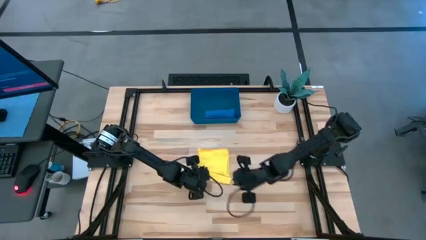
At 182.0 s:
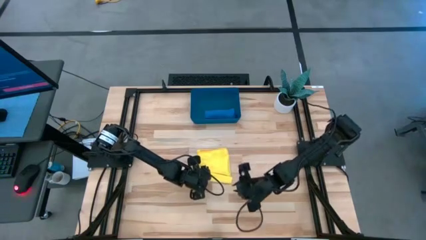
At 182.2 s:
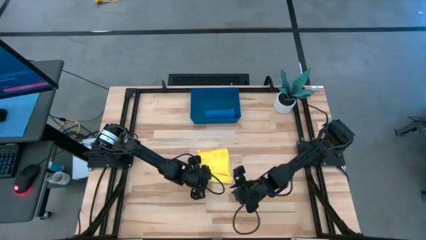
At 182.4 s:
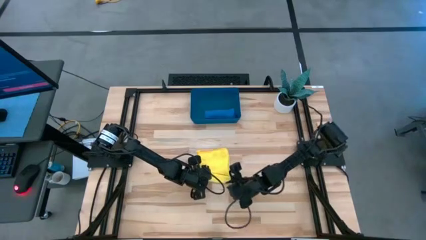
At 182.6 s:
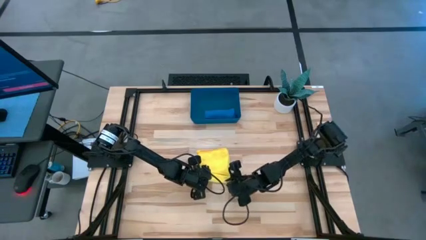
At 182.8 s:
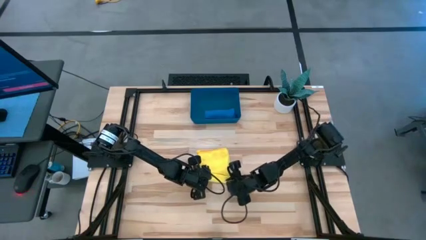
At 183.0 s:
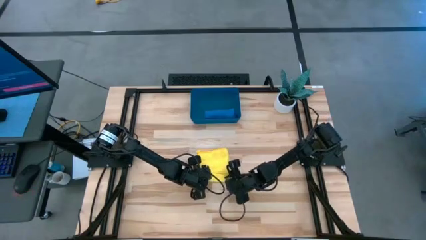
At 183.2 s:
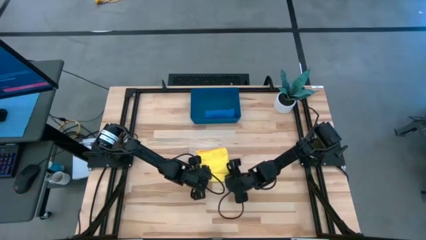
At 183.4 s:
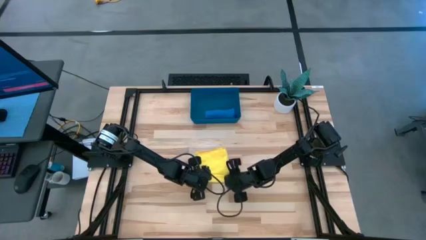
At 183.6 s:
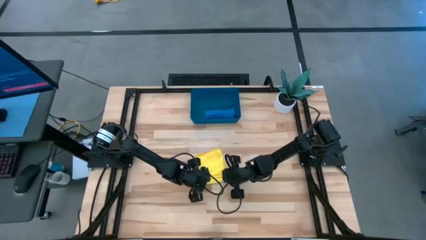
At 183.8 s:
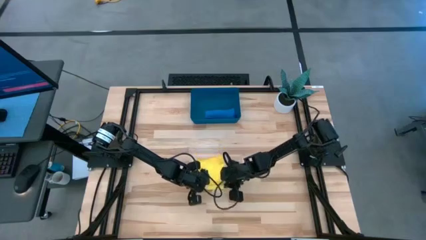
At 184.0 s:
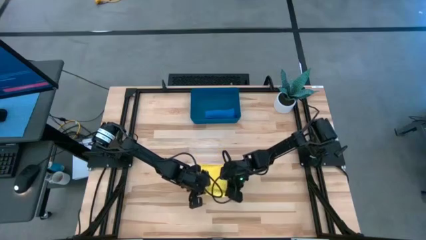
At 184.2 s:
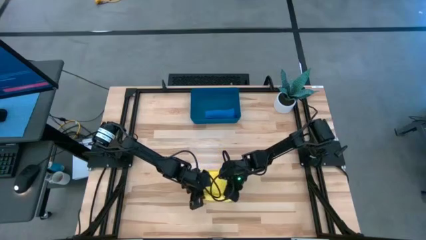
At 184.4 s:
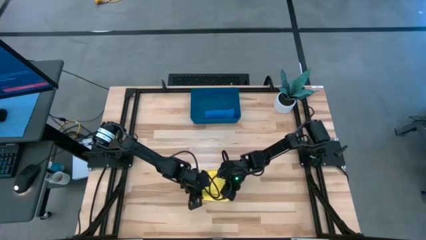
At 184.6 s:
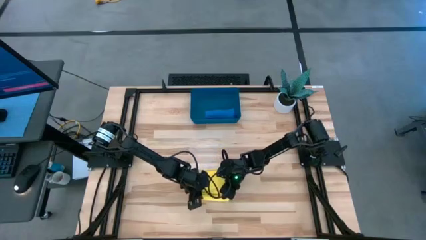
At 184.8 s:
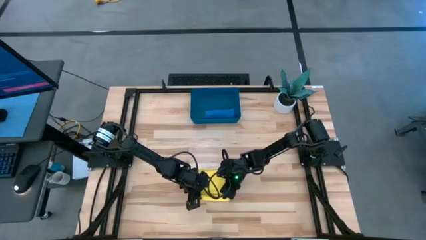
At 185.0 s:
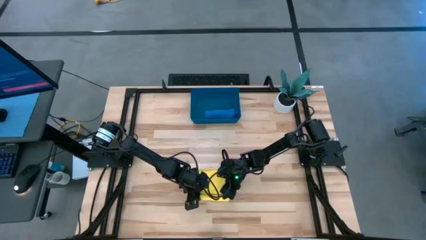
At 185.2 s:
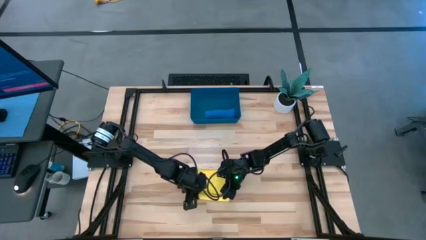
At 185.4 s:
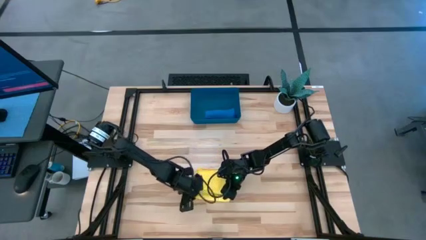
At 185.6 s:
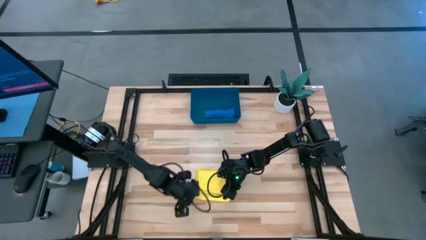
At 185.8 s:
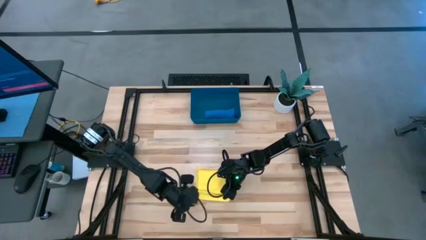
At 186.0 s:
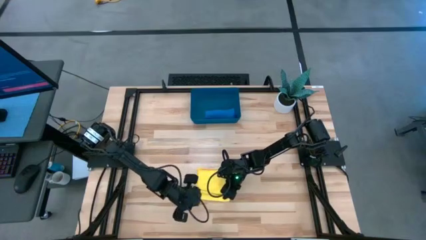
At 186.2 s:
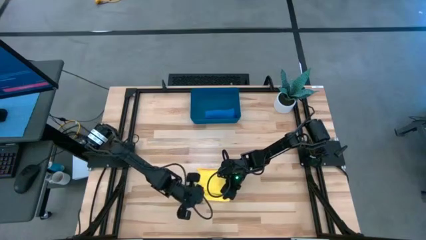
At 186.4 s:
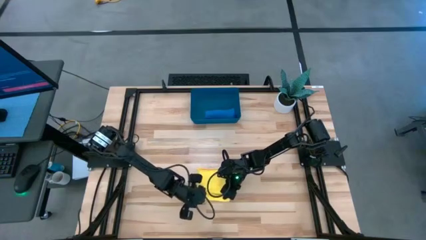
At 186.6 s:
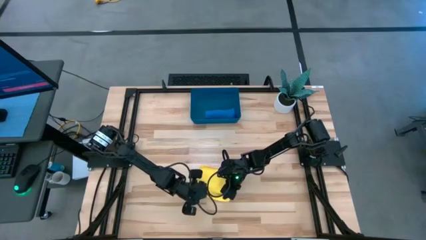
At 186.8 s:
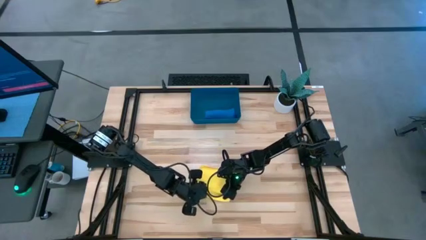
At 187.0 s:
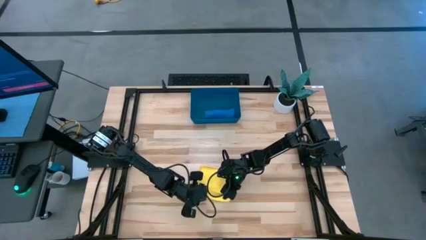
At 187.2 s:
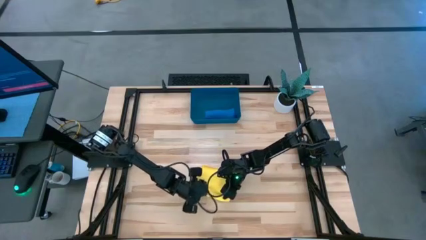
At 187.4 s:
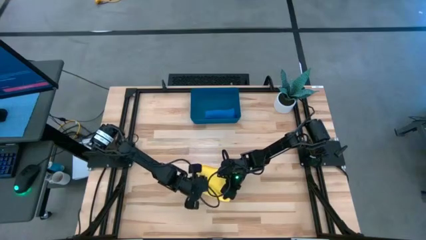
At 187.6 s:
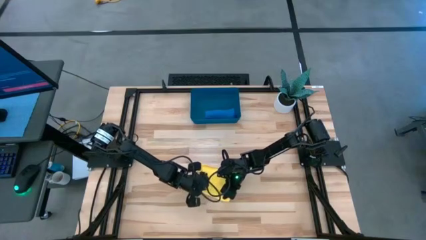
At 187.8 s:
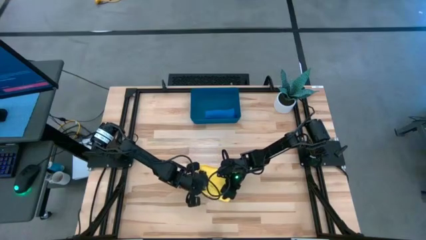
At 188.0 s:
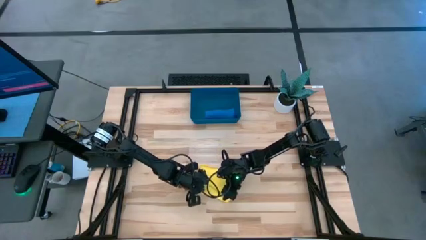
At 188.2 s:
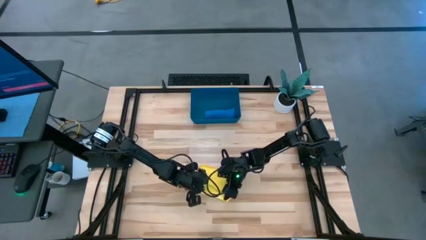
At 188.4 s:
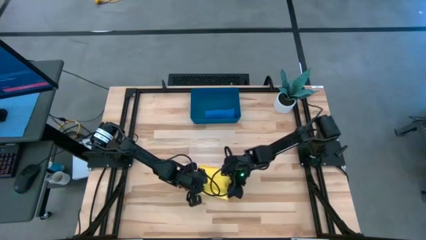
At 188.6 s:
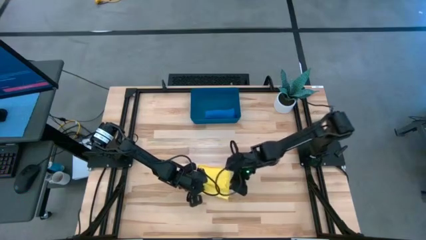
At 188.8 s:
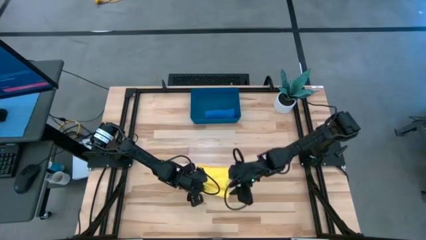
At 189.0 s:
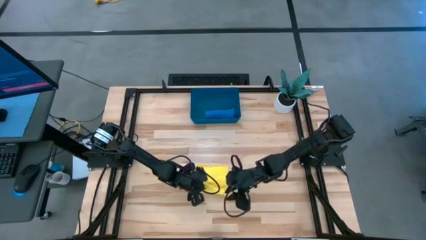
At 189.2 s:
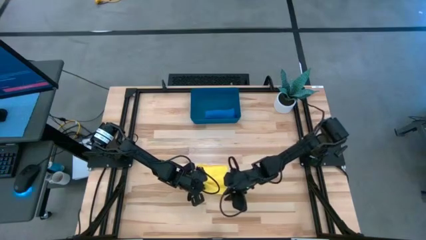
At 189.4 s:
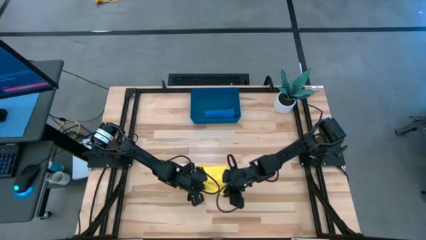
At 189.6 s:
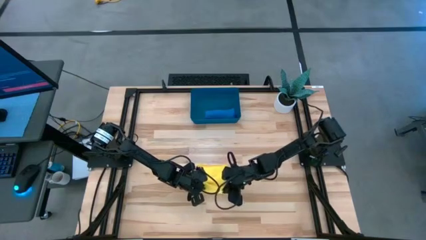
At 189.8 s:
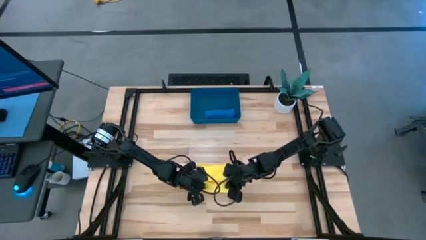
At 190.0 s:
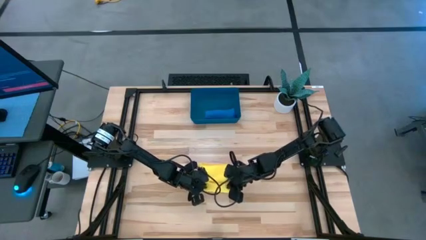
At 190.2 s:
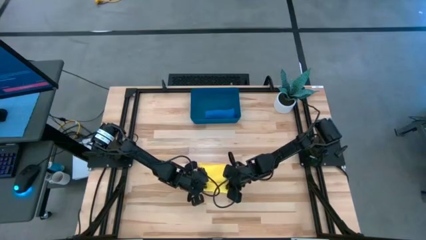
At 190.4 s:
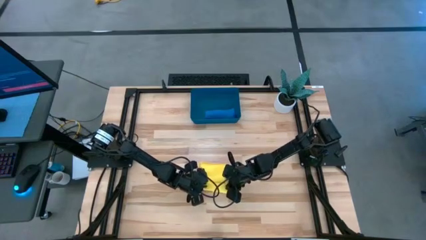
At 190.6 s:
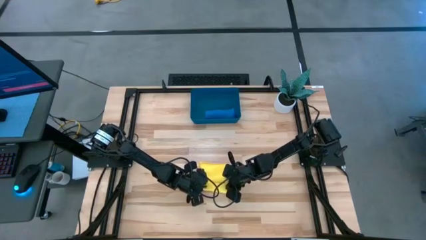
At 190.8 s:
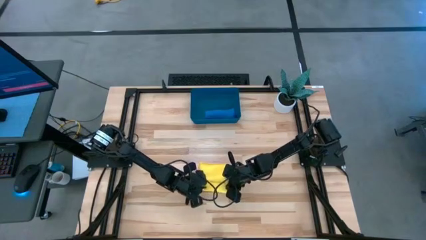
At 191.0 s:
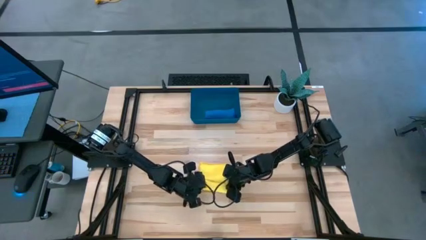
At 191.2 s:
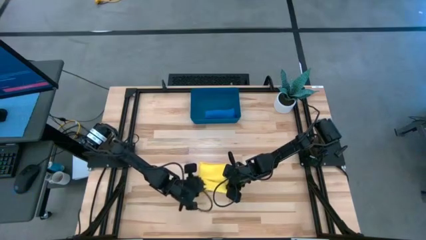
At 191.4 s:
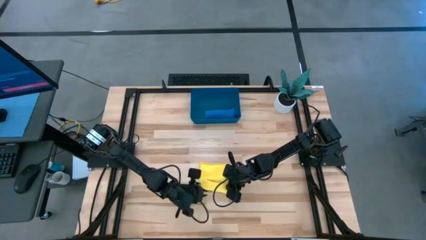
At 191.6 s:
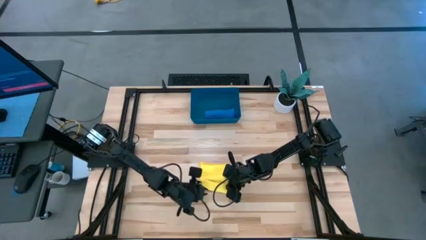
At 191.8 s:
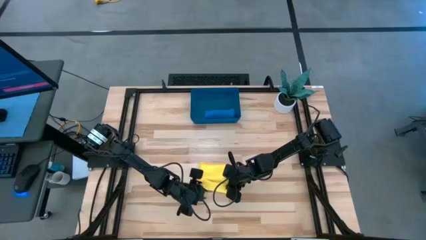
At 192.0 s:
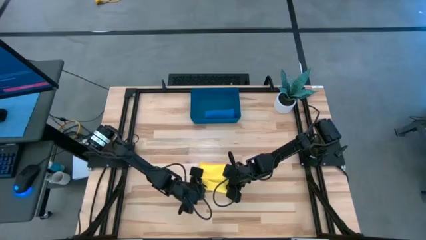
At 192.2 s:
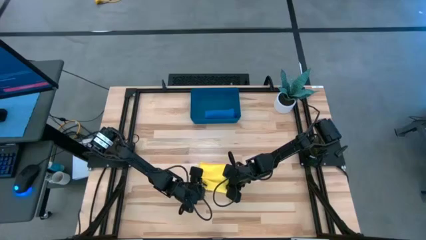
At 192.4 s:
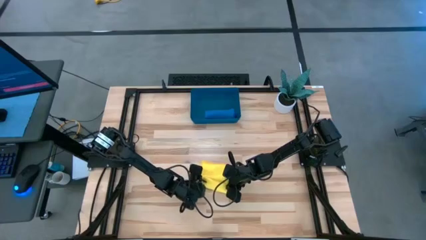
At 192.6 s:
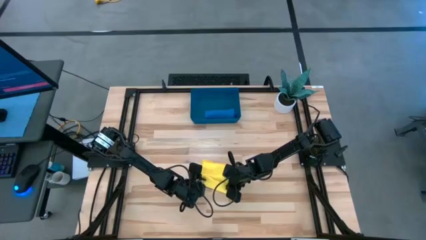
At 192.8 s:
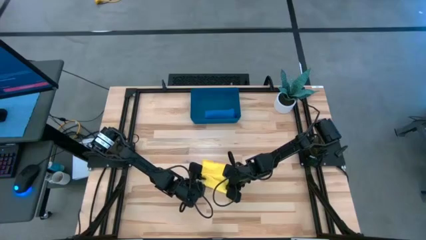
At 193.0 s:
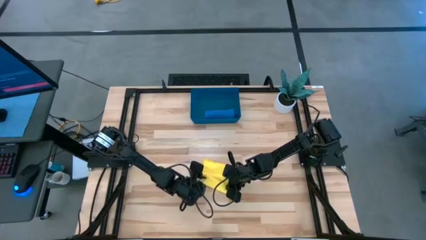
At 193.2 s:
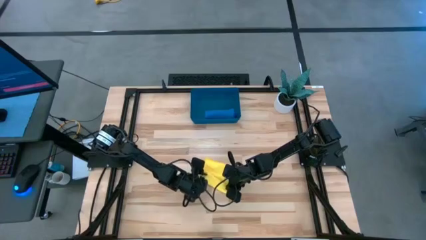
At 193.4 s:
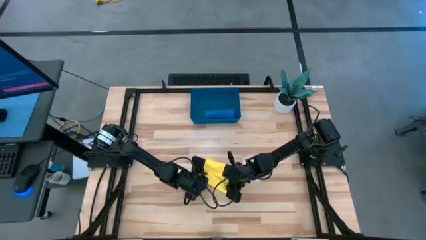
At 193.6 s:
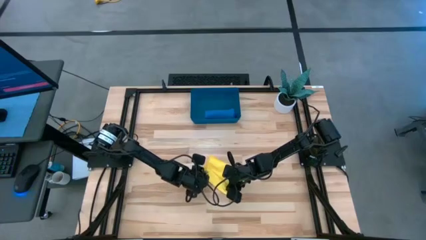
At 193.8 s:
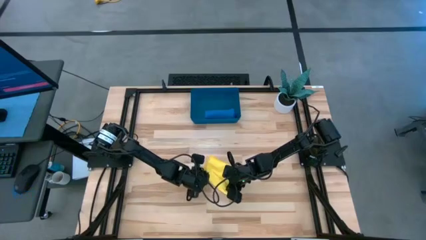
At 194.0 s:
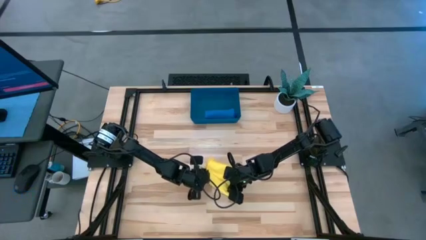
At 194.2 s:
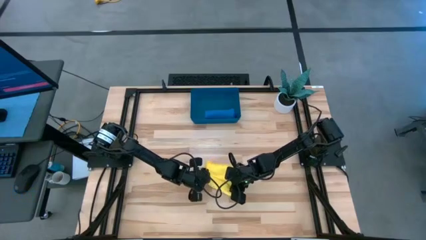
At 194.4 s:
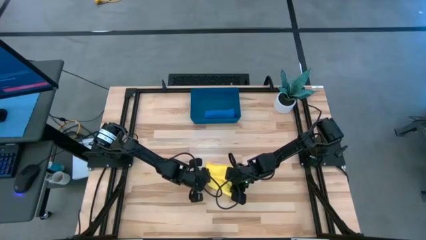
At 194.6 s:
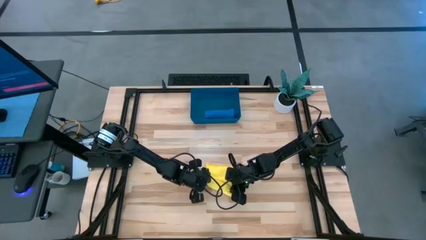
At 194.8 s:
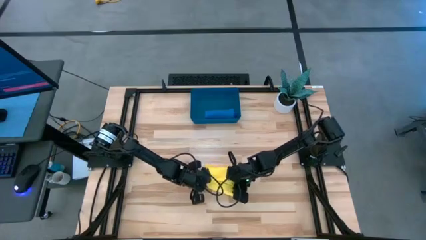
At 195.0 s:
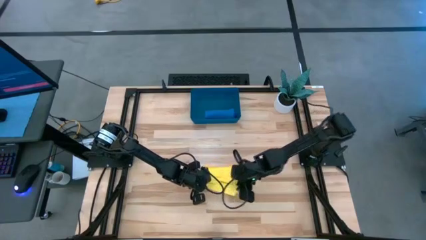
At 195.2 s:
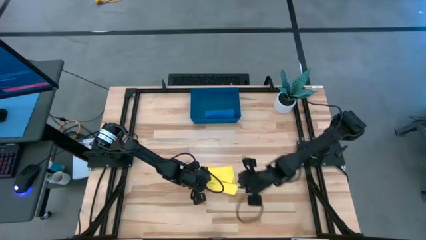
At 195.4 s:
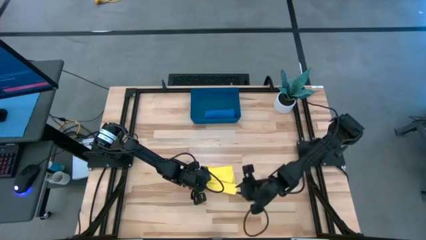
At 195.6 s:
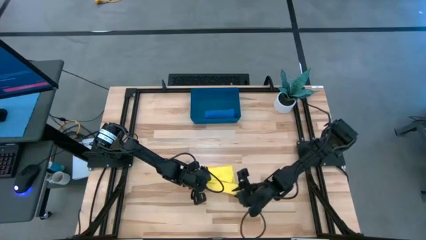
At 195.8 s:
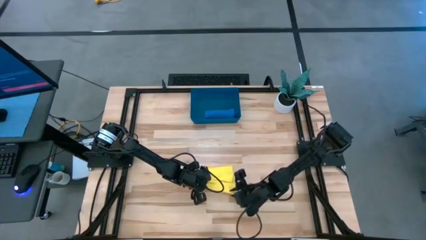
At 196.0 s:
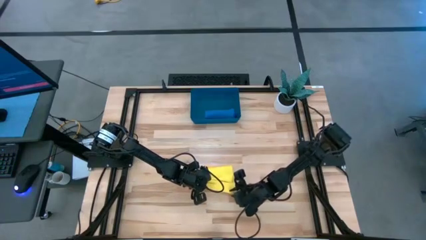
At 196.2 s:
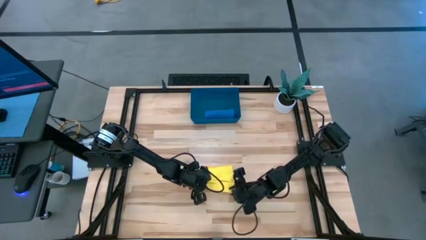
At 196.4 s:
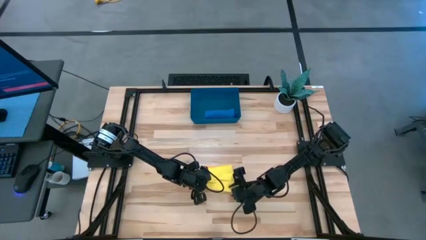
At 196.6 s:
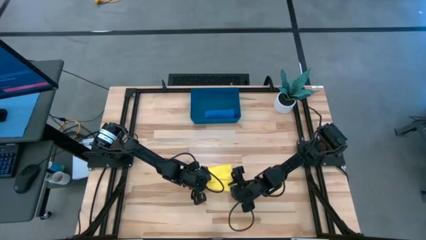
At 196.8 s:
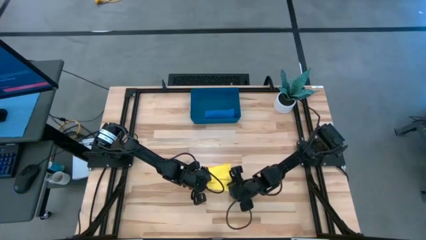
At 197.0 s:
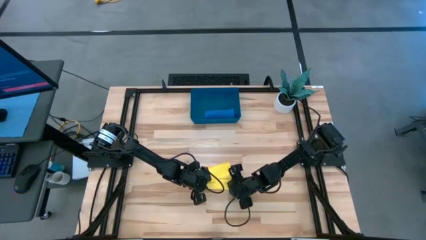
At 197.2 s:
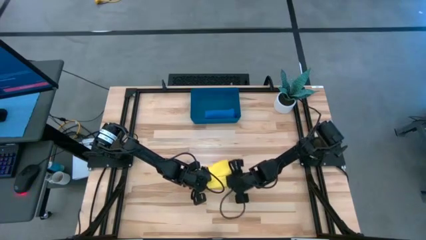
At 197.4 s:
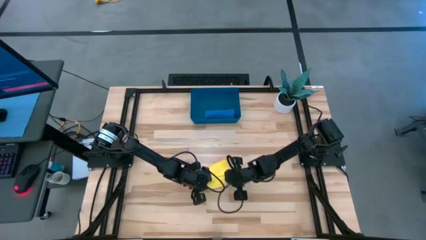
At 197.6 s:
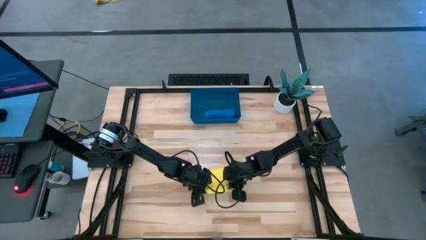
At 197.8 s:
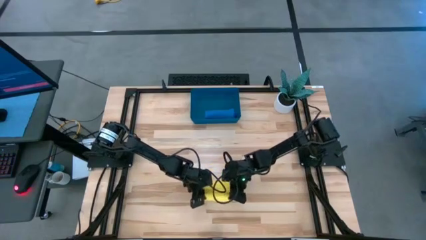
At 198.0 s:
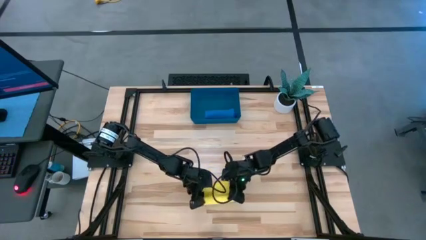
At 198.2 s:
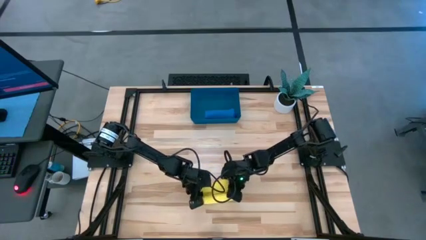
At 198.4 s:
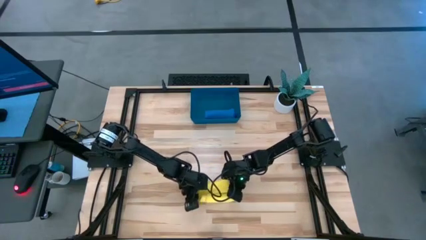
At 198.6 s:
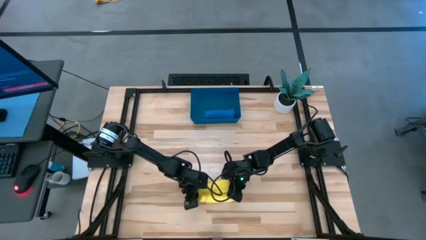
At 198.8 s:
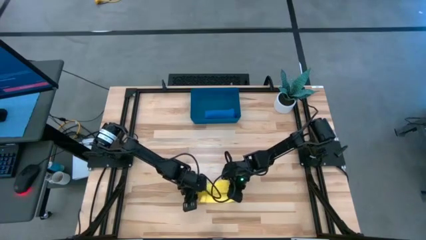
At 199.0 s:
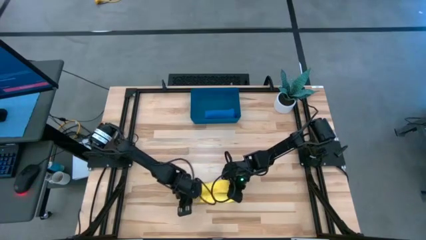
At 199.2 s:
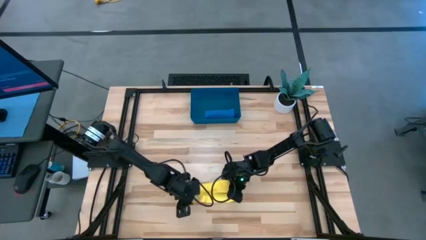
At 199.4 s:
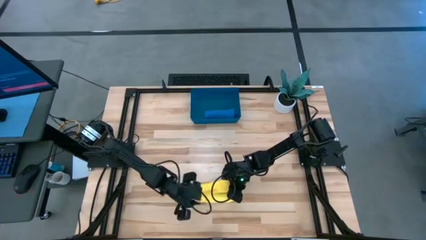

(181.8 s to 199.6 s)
Task: Roll microfiber towels into tight, uniform cylinder then place into a basket
Roll the yellow towel
